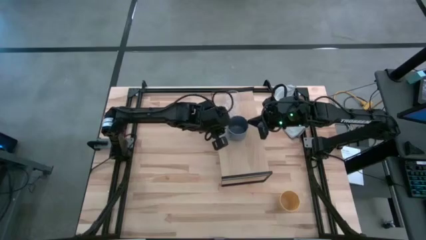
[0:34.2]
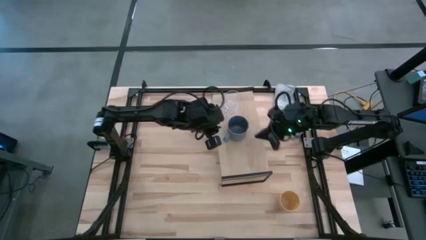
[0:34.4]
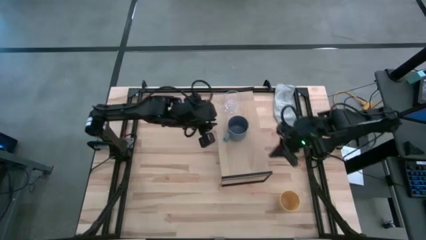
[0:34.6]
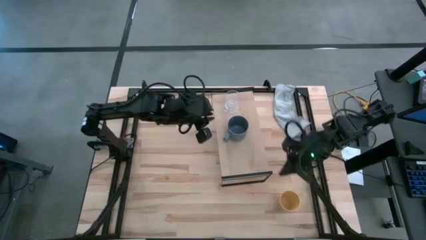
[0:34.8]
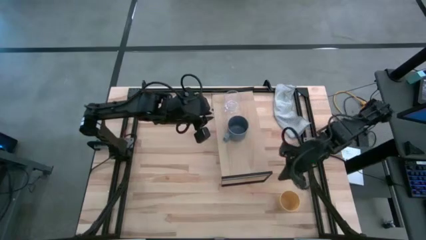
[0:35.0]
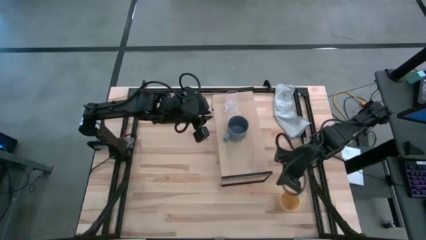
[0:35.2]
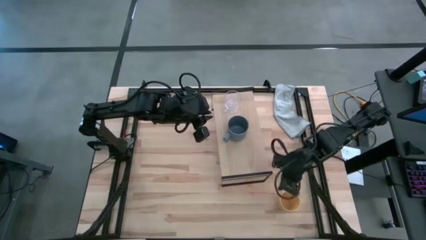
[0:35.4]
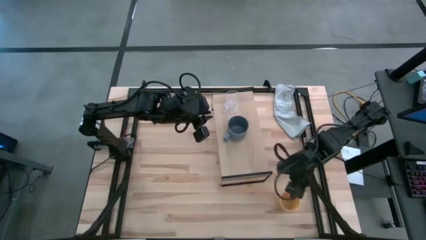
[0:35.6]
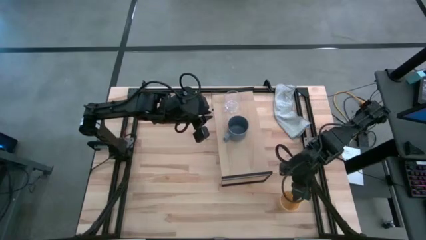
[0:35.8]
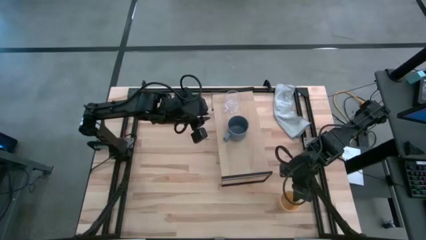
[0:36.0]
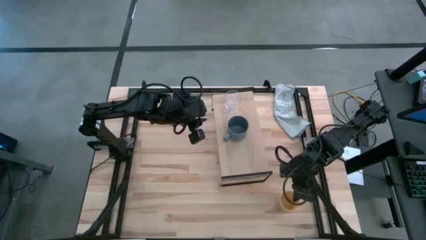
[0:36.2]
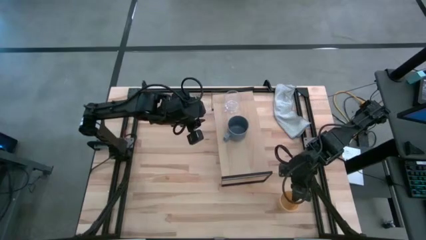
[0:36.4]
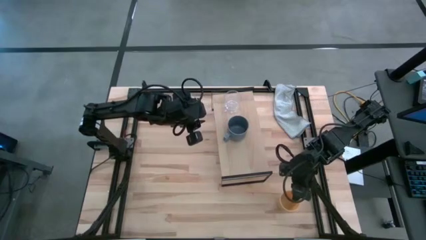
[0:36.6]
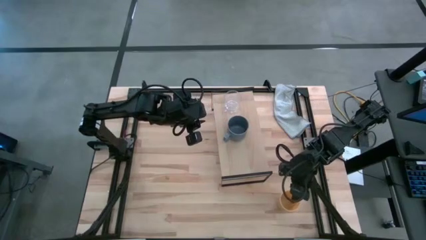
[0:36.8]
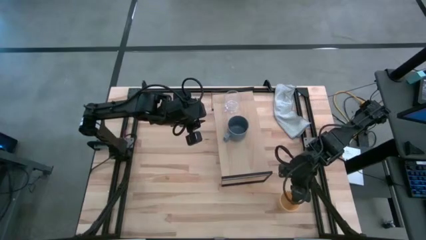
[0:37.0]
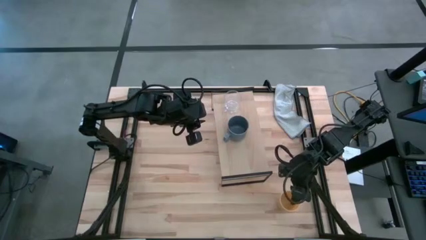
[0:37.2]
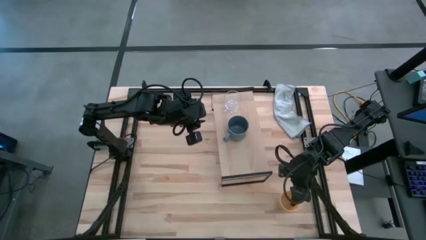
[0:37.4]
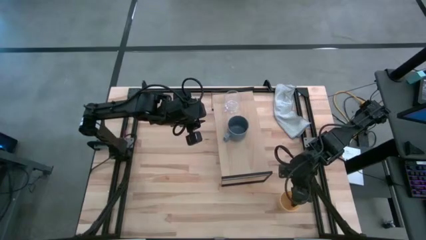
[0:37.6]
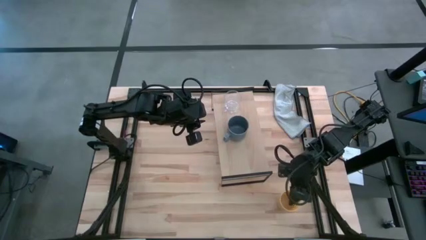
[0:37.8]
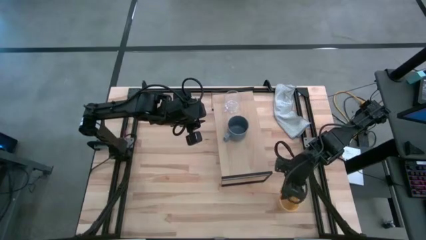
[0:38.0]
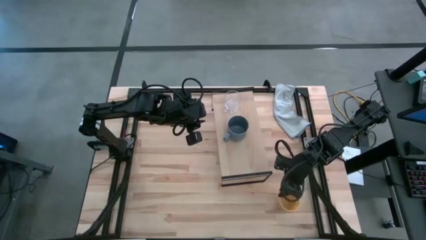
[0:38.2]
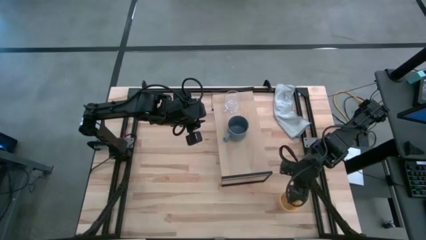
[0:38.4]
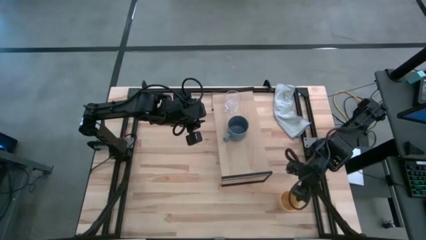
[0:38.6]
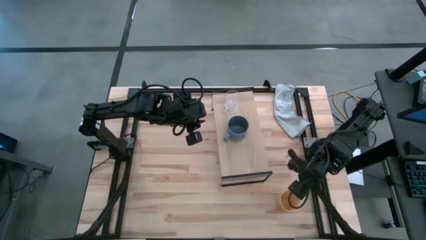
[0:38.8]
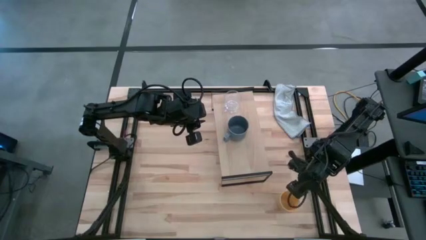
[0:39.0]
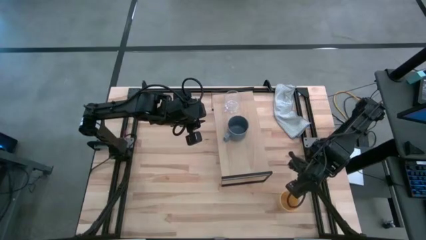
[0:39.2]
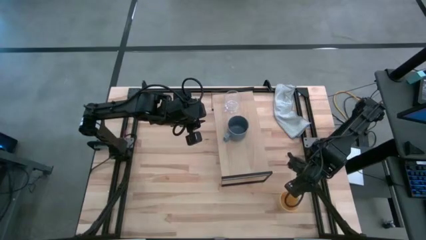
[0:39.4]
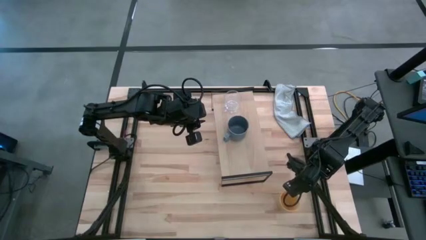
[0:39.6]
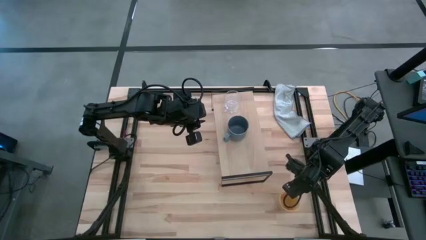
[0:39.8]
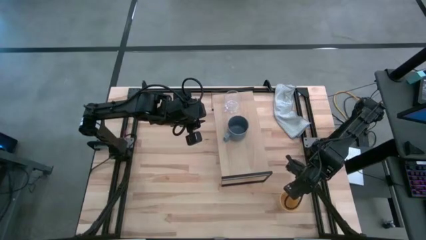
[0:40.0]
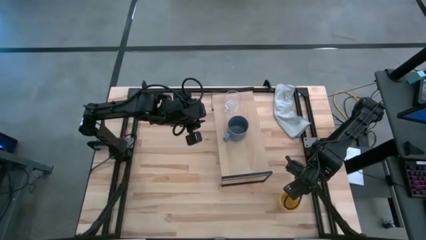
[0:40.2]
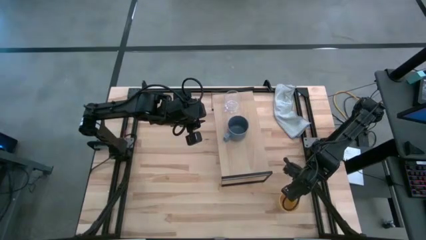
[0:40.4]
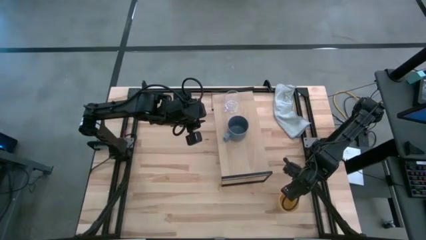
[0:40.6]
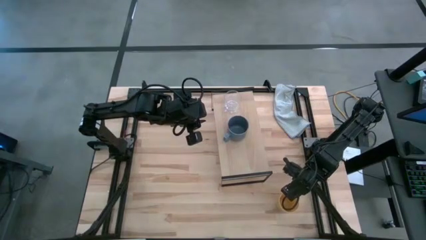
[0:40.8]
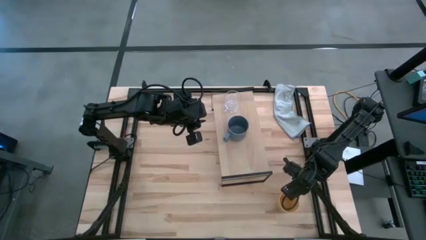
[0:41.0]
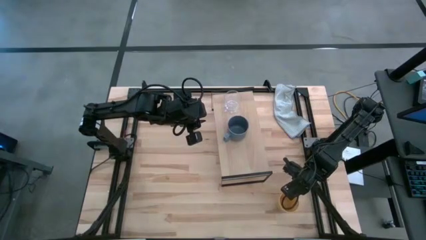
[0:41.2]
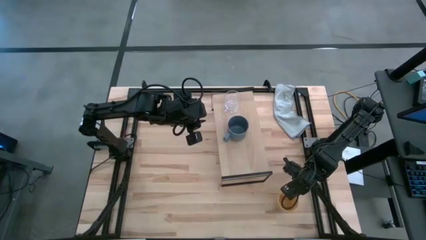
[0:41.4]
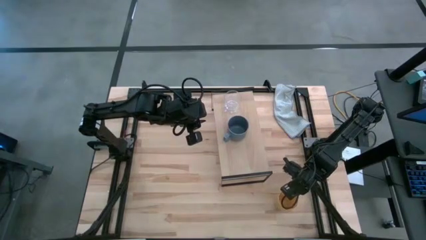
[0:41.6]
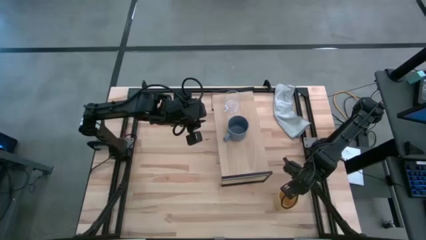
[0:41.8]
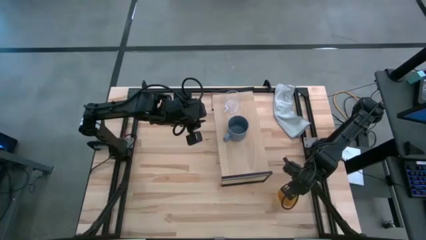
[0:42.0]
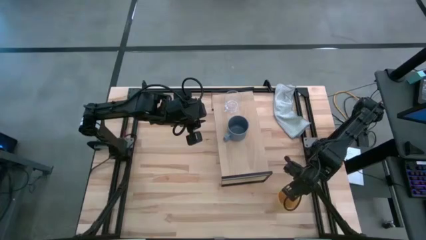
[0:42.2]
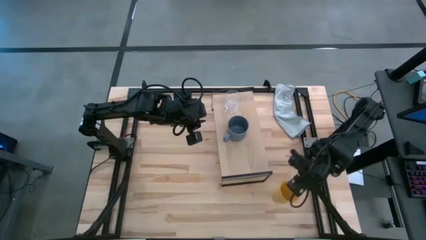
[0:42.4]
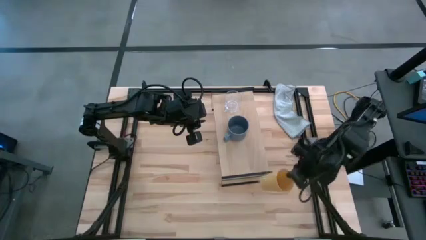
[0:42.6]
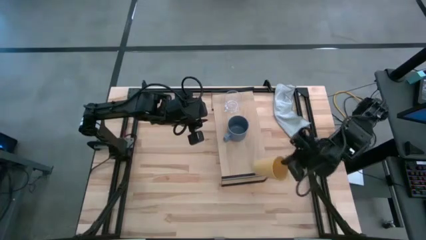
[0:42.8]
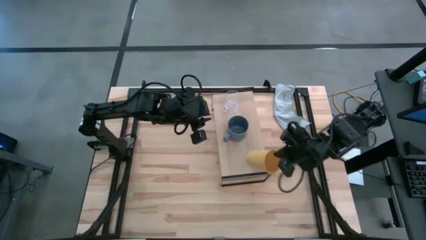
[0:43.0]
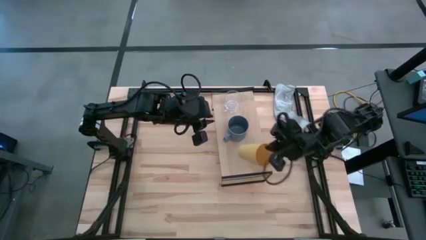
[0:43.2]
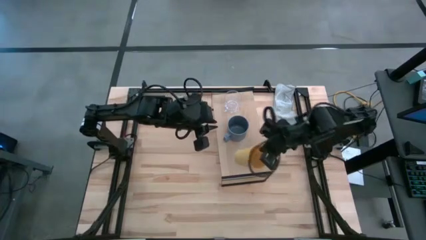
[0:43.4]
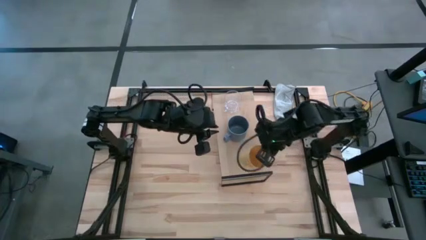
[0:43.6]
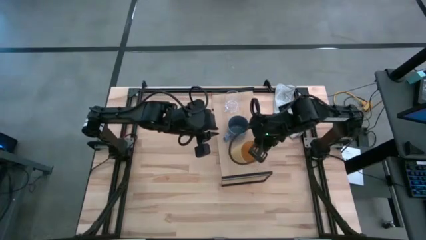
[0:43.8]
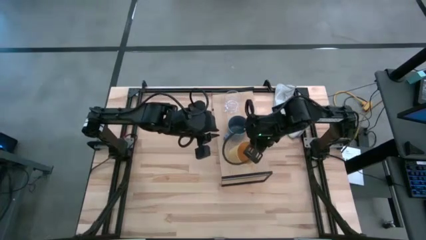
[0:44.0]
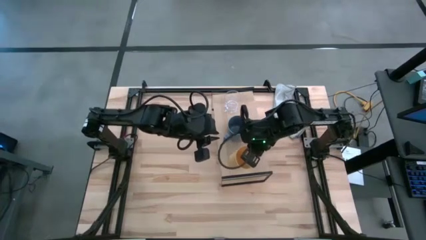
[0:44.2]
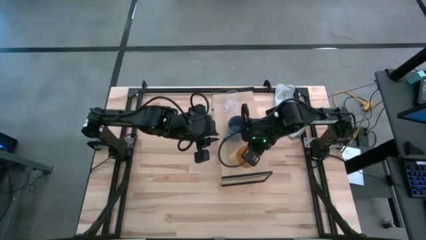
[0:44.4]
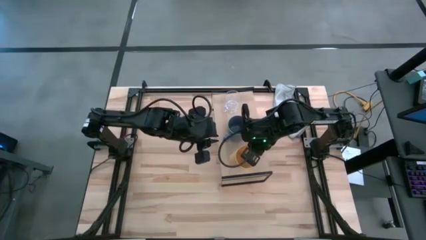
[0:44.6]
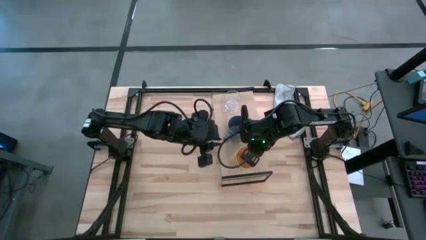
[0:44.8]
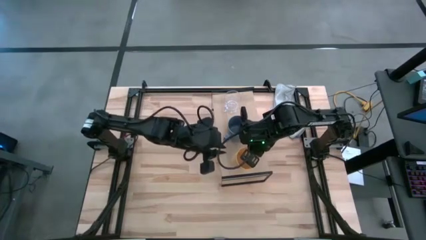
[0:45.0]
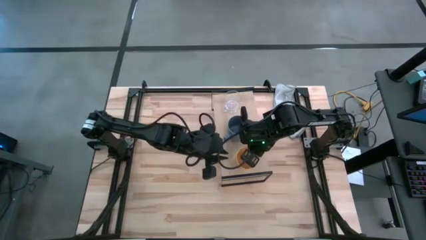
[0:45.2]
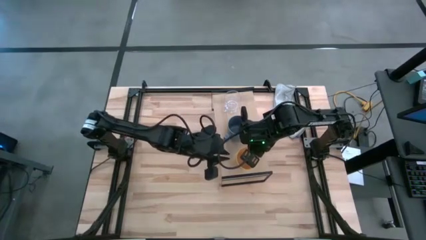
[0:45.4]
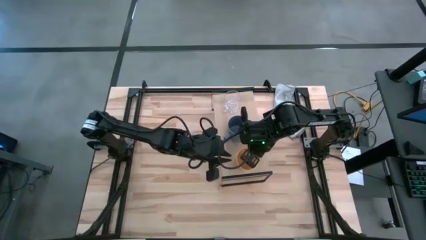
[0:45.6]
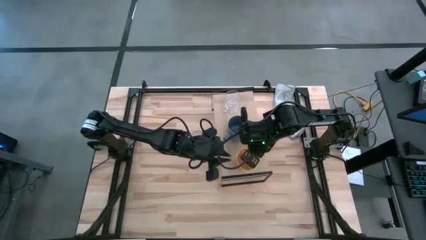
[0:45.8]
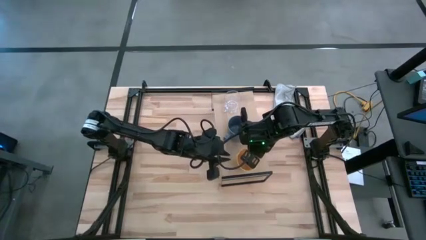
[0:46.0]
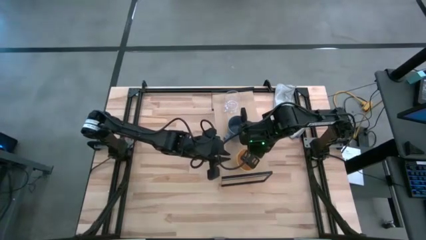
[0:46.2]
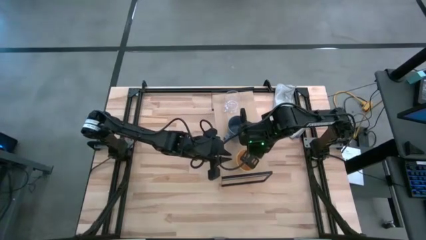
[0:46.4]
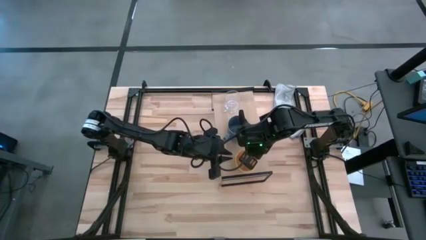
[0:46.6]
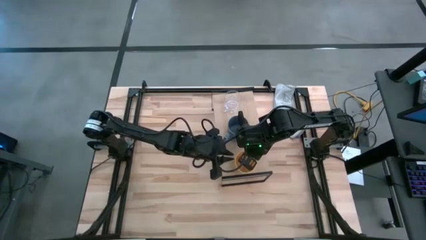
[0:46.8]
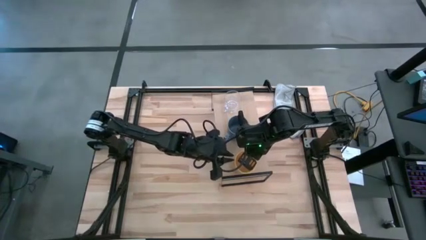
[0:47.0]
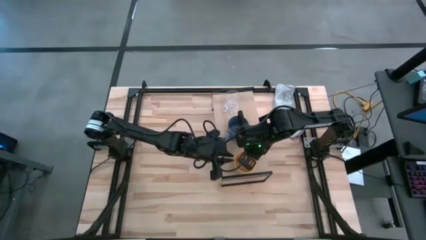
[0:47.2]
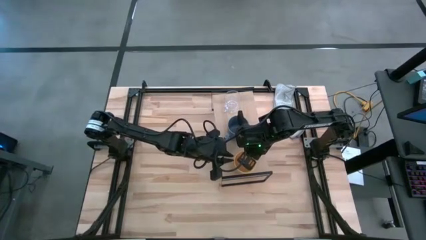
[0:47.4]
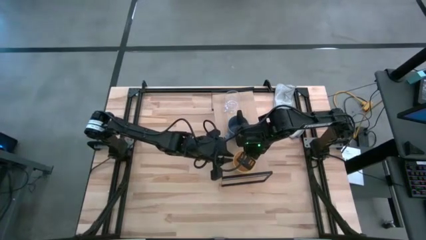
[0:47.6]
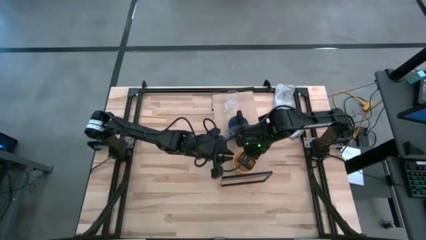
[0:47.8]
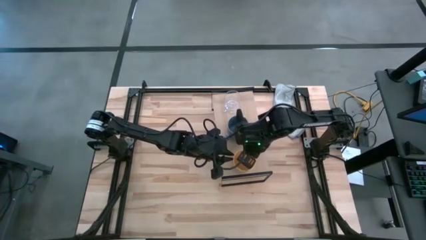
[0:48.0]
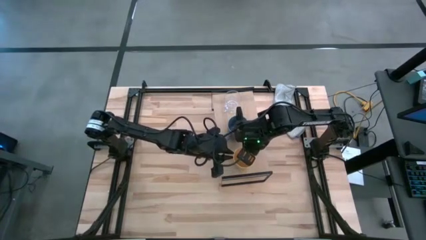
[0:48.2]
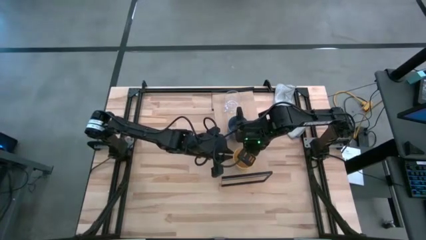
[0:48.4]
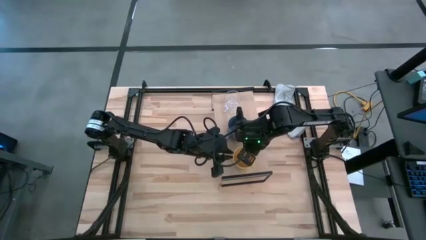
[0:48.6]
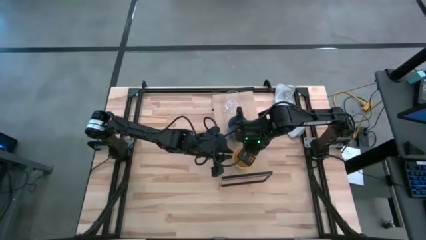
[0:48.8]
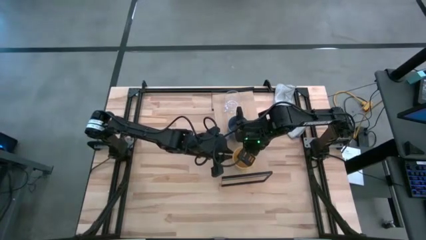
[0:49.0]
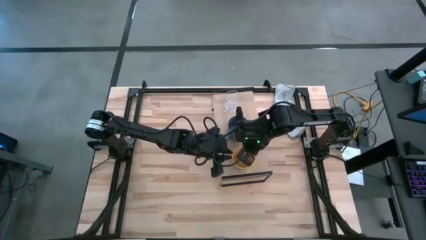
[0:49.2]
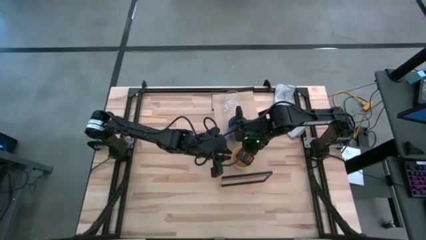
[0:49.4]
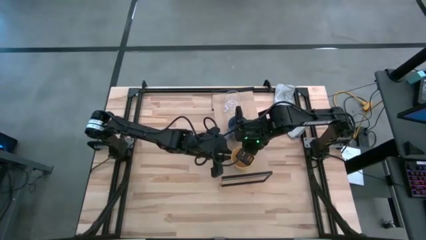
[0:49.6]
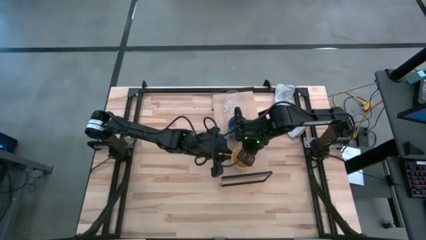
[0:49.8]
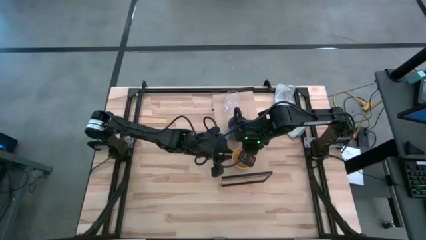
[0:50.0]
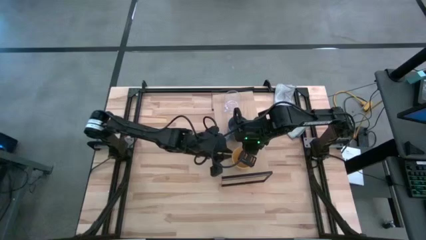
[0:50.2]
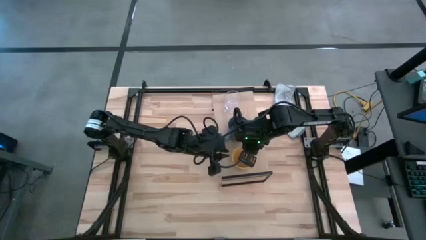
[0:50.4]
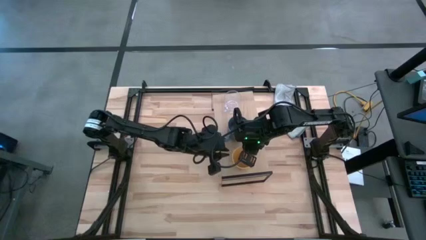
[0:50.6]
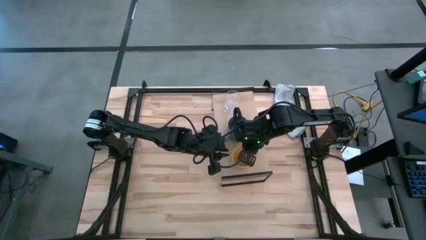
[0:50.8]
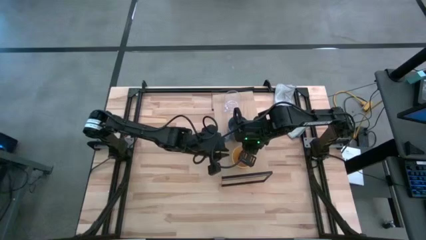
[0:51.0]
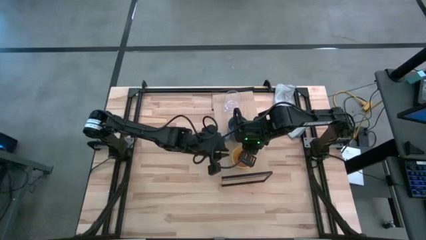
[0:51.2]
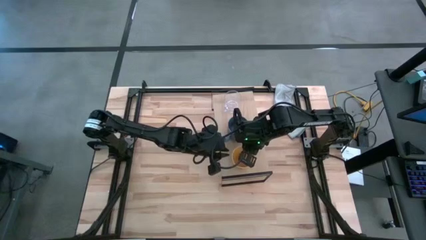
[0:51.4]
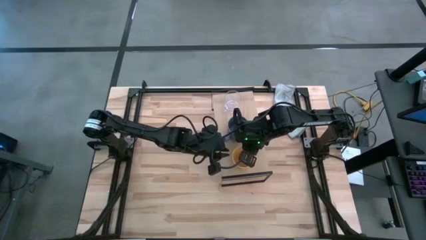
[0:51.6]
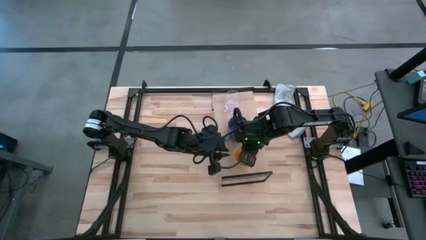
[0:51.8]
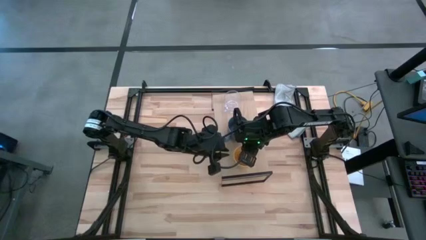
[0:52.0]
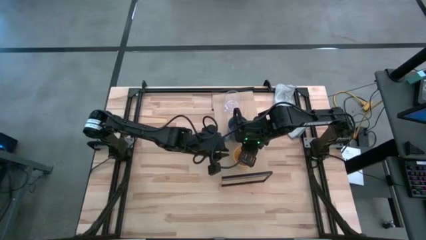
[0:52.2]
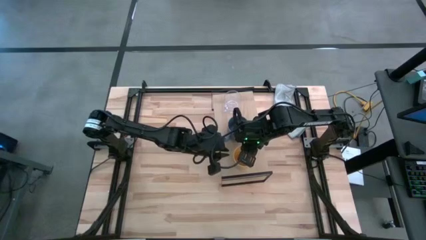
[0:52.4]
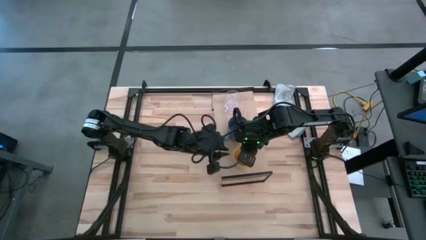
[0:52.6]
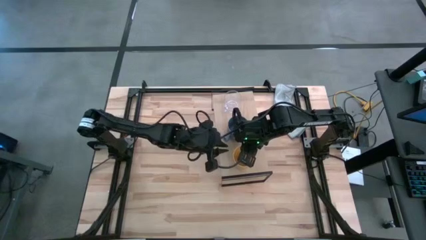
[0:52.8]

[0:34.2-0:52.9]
Task: Stack small to large cups/mugs on shelf
Put the yellow cup on the shelf
